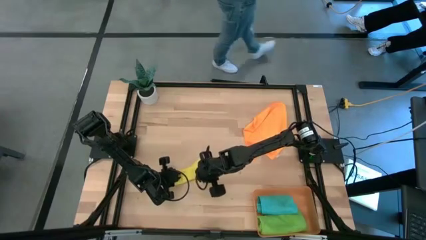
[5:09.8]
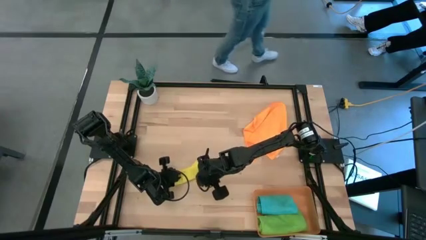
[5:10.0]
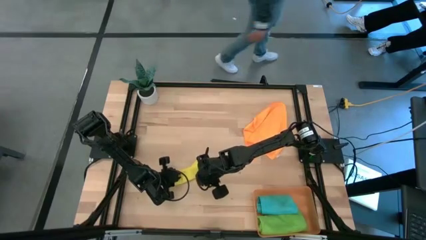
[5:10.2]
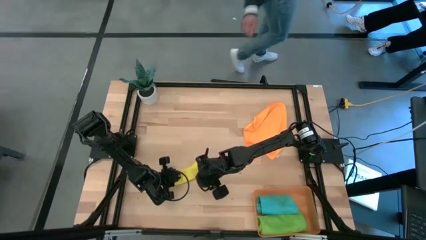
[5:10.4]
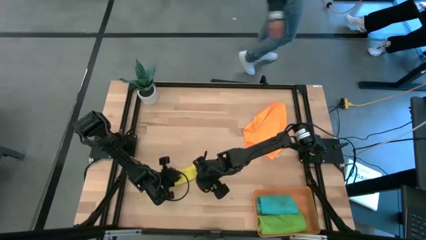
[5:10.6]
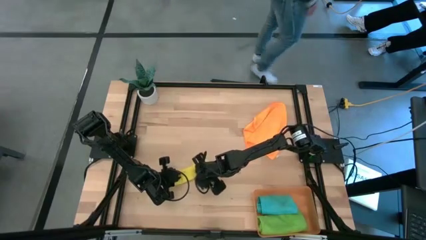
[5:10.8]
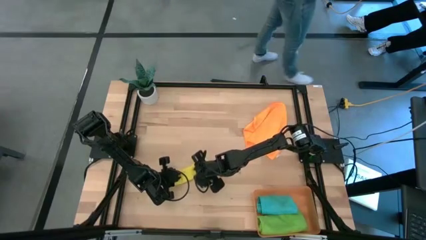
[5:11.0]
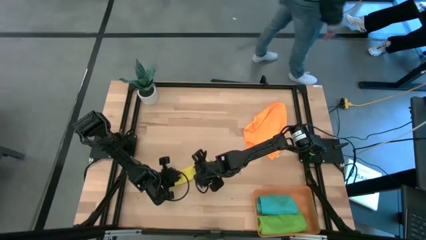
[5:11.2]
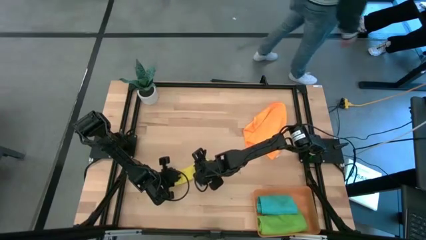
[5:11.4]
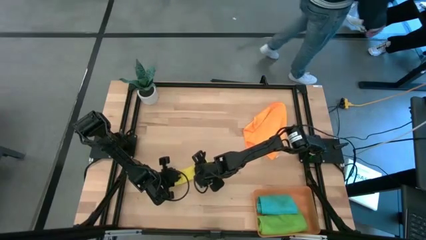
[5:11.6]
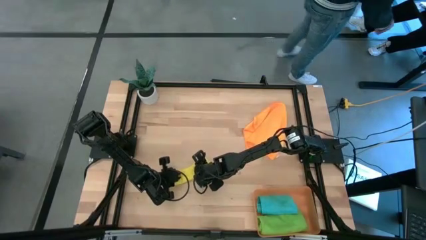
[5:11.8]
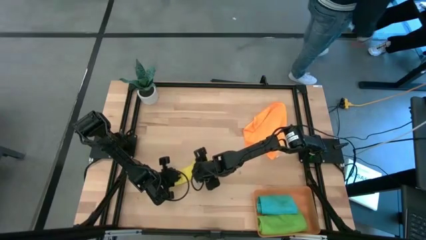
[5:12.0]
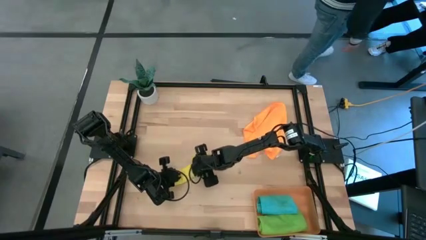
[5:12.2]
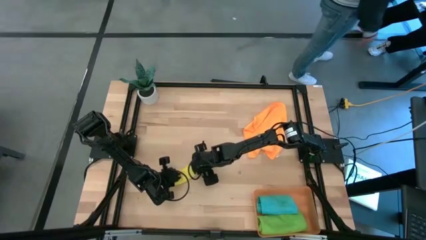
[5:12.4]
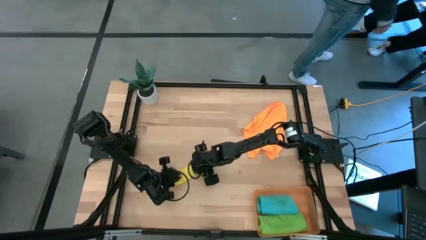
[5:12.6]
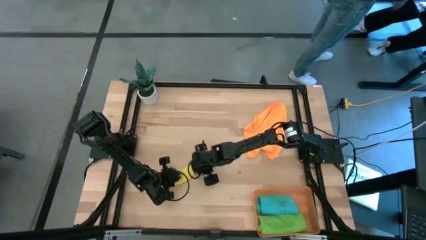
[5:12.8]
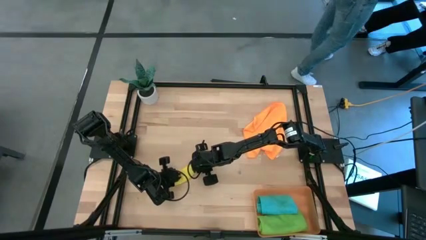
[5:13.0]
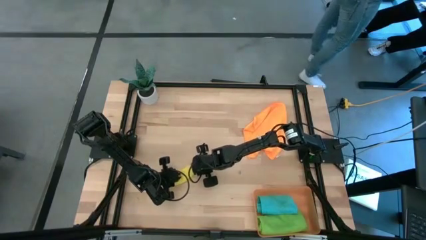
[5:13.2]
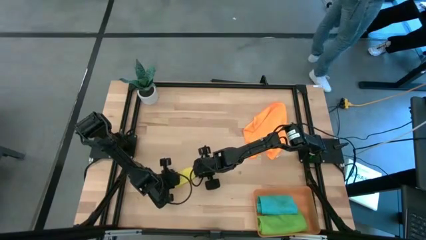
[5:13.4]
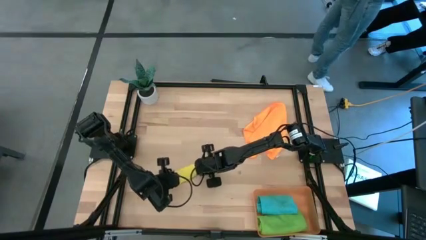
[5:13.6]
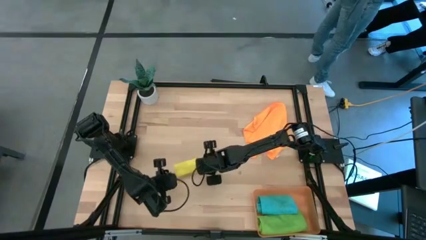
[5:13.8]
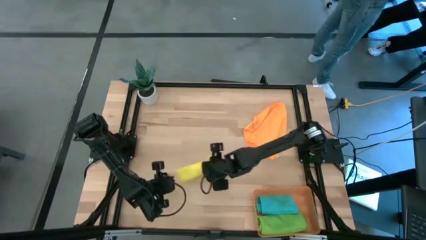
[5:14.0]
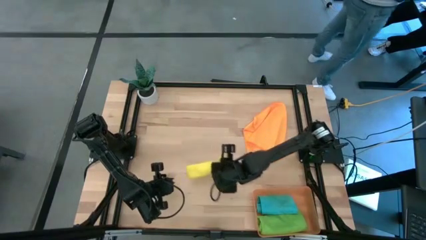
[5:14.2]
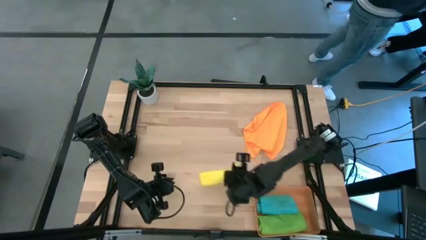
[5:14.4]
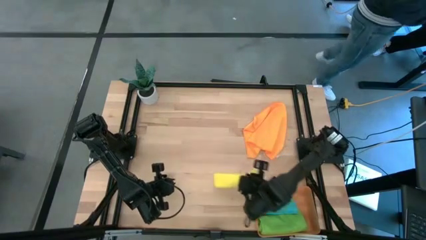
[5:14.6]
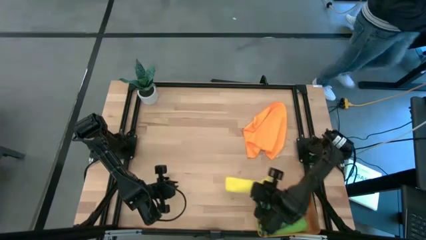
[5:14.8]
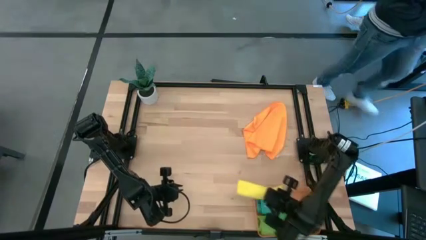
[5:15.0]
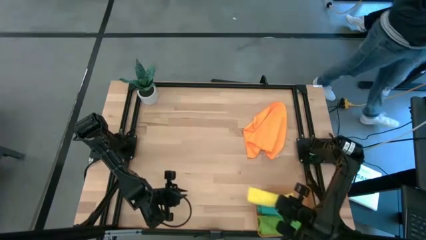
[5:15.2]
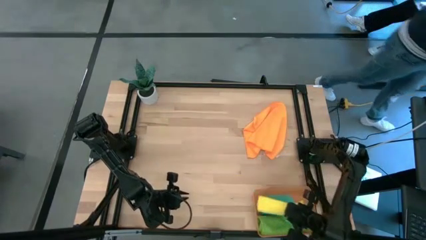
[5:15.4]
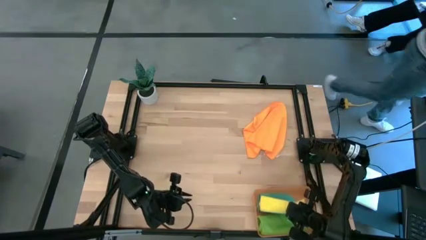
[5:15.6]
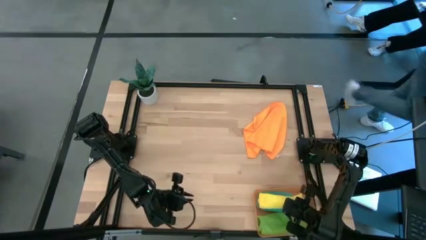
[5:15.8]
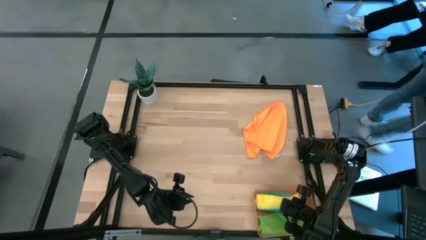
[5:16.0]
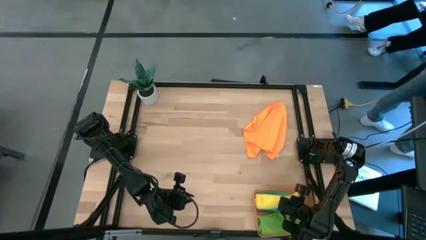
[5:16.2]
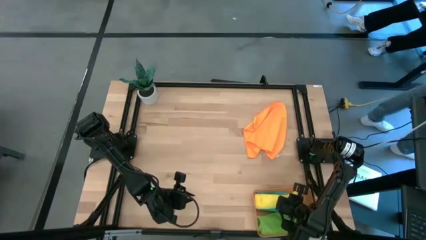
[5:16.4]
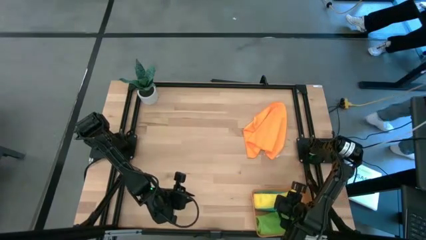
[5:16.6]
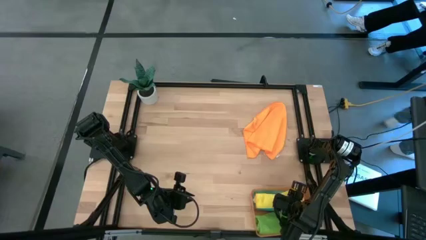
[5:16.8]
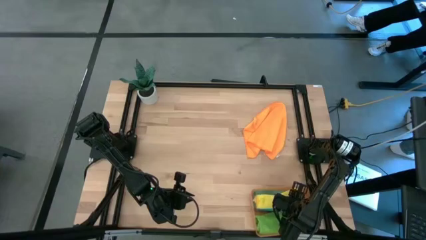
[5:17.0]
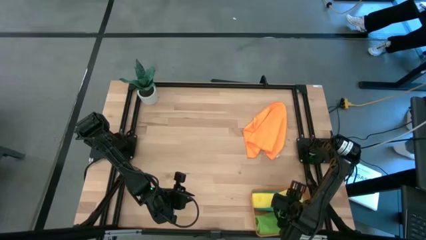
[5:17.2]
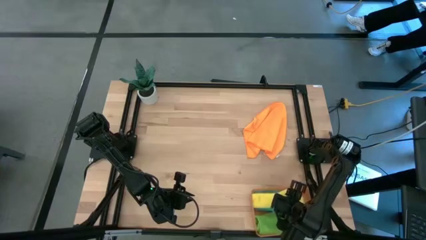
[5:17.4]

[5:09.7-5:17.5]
Task: Roll microfiber towels into tight, uniform cylinder then place into a basket
Stack the yellow microfiber towel on top of the blue microfiber towel in the orange bin

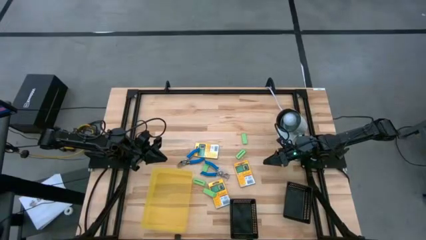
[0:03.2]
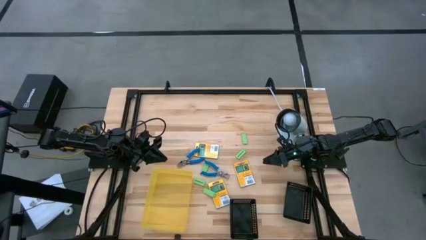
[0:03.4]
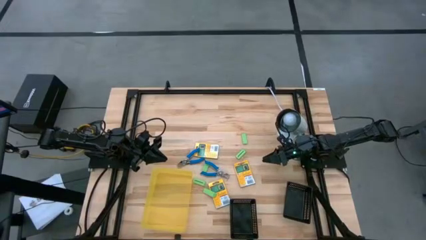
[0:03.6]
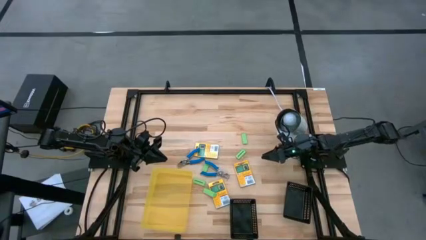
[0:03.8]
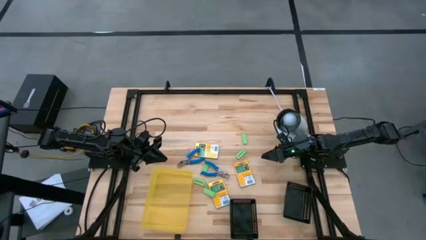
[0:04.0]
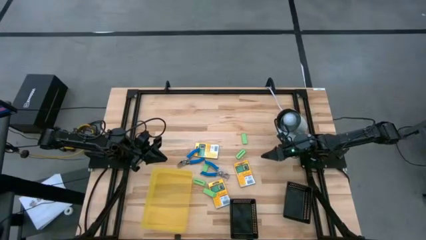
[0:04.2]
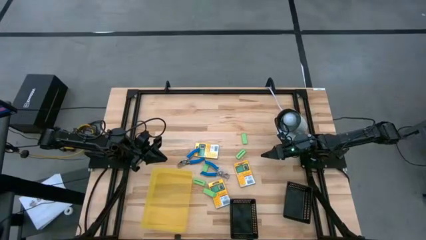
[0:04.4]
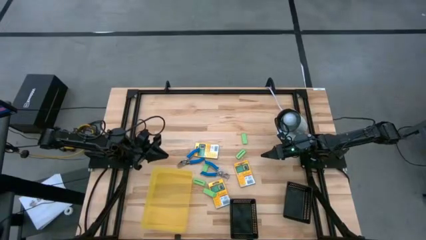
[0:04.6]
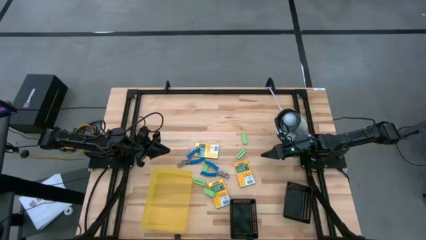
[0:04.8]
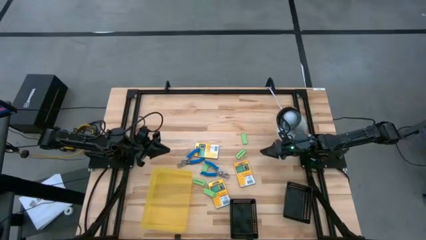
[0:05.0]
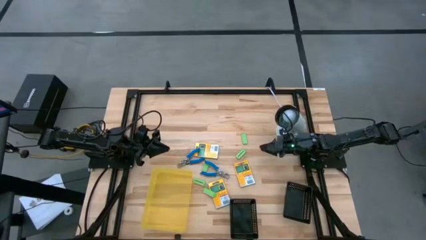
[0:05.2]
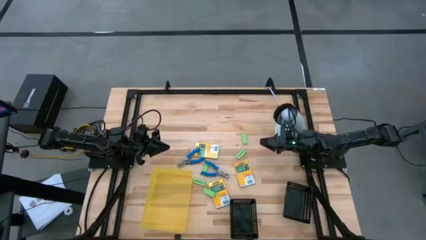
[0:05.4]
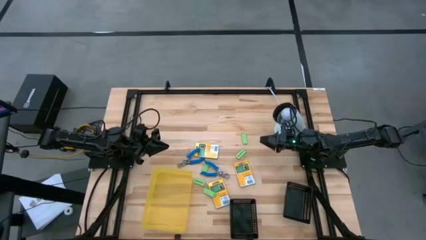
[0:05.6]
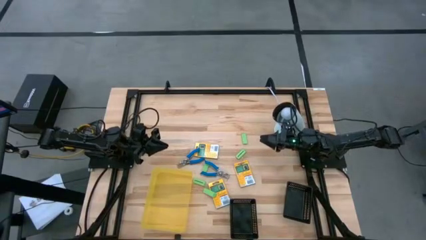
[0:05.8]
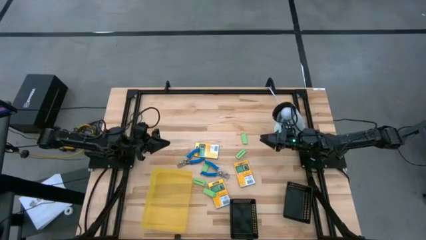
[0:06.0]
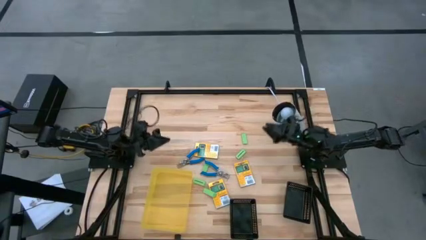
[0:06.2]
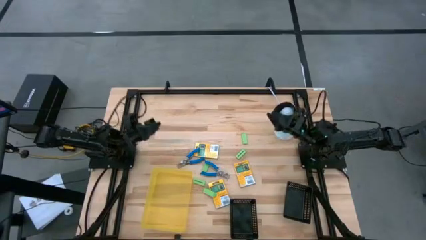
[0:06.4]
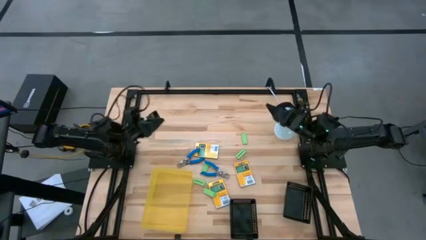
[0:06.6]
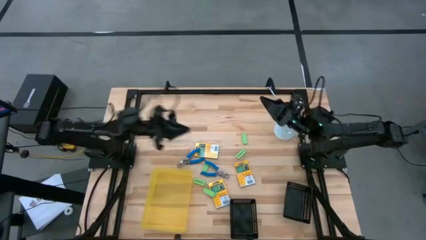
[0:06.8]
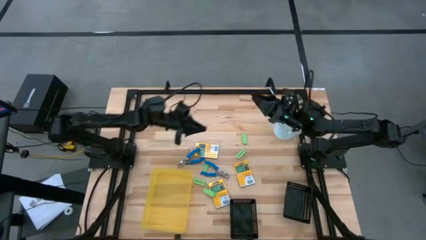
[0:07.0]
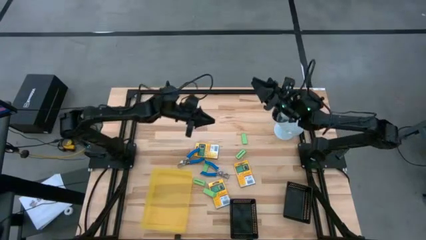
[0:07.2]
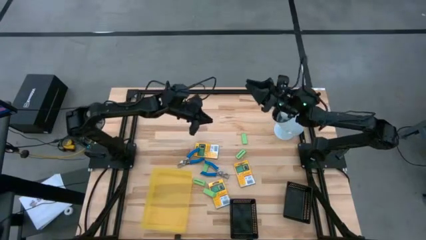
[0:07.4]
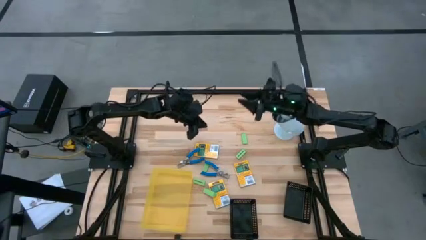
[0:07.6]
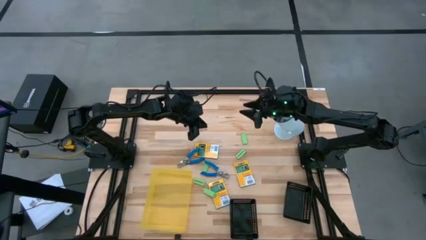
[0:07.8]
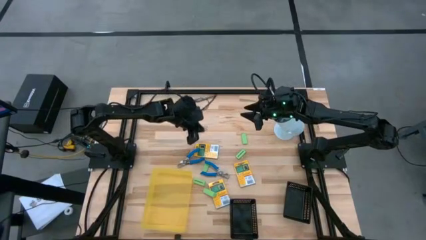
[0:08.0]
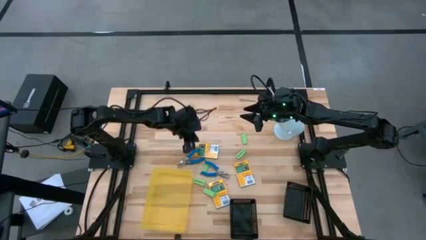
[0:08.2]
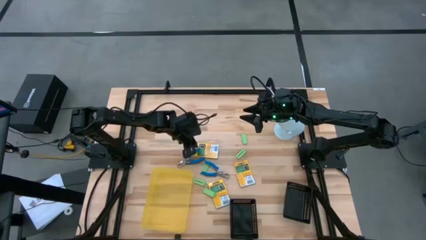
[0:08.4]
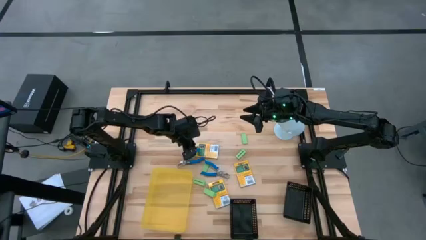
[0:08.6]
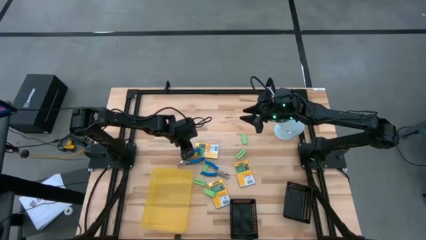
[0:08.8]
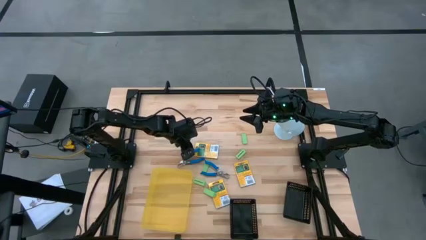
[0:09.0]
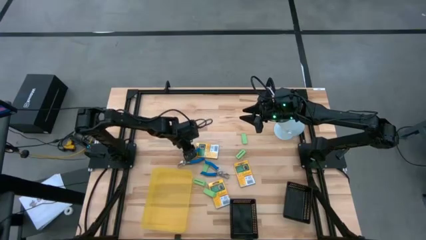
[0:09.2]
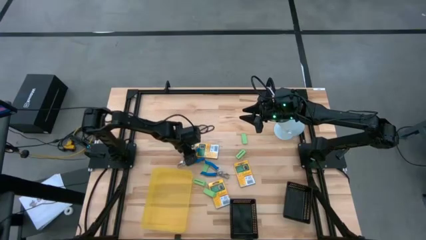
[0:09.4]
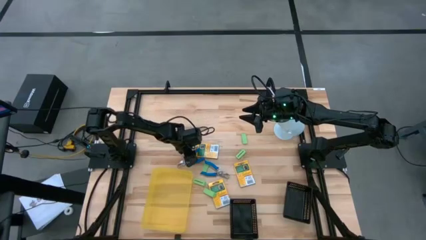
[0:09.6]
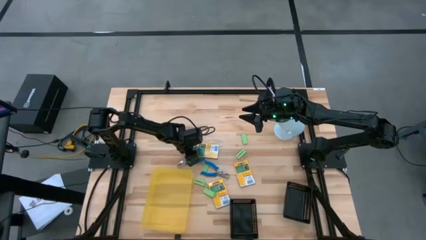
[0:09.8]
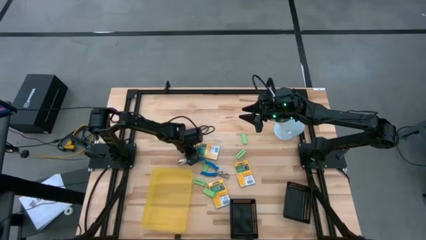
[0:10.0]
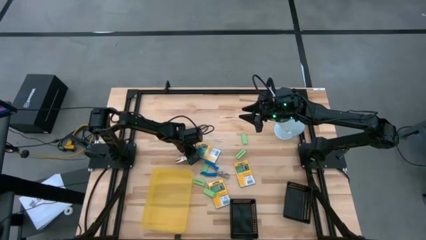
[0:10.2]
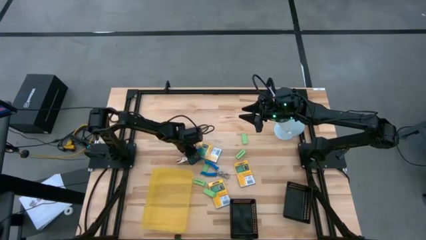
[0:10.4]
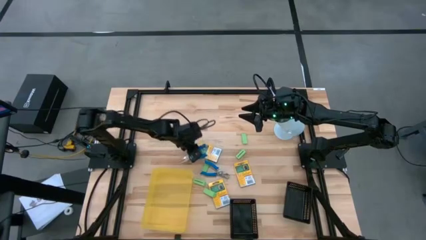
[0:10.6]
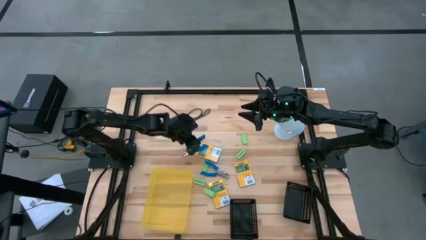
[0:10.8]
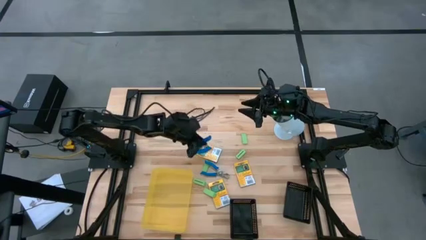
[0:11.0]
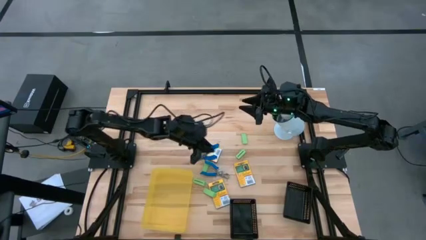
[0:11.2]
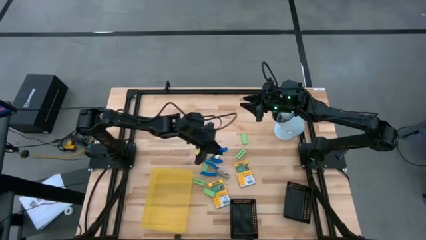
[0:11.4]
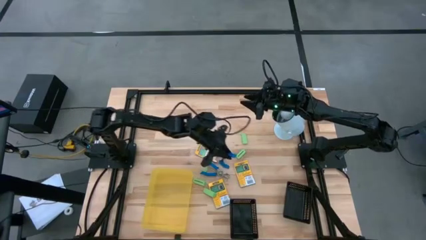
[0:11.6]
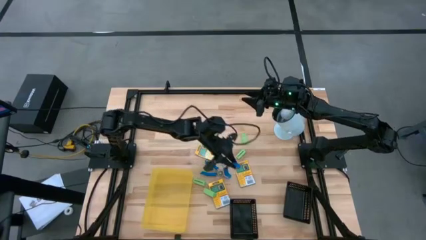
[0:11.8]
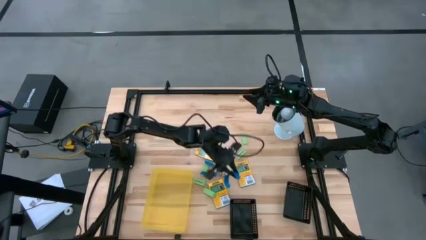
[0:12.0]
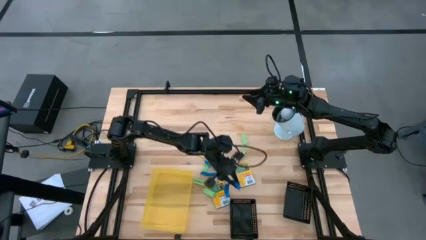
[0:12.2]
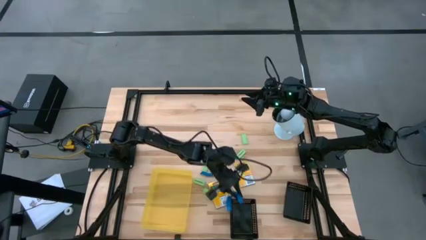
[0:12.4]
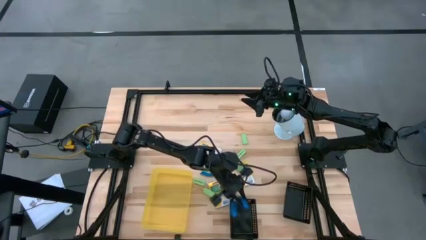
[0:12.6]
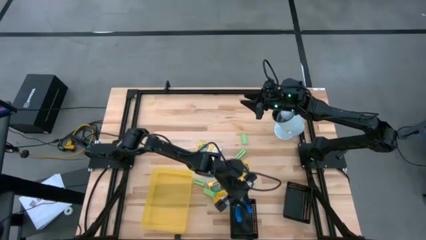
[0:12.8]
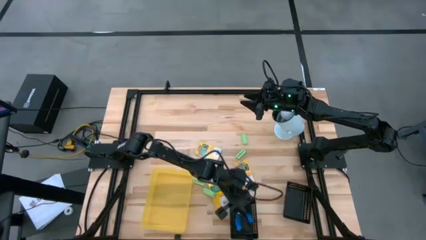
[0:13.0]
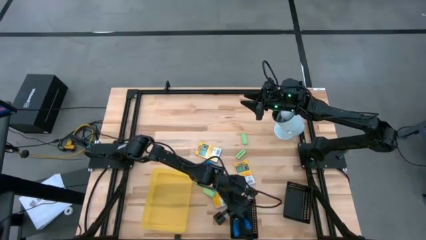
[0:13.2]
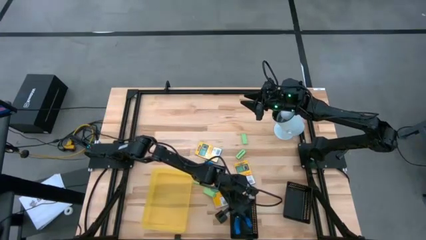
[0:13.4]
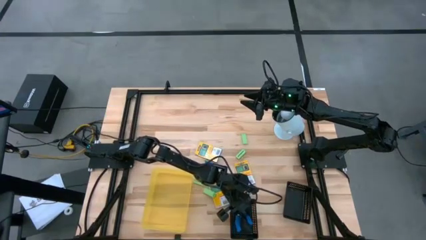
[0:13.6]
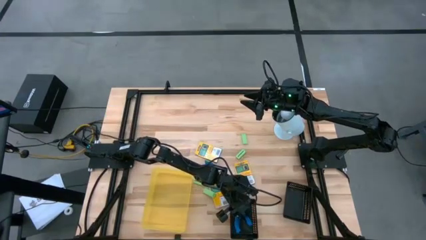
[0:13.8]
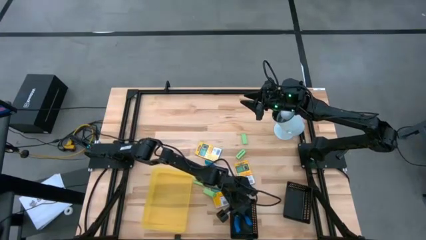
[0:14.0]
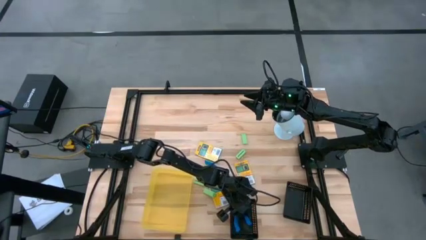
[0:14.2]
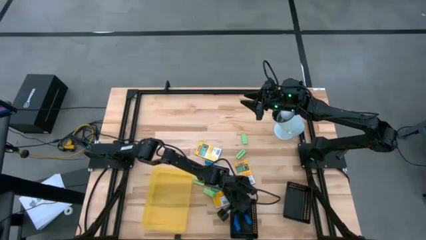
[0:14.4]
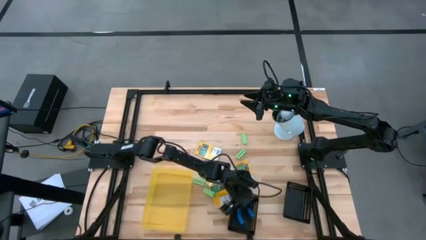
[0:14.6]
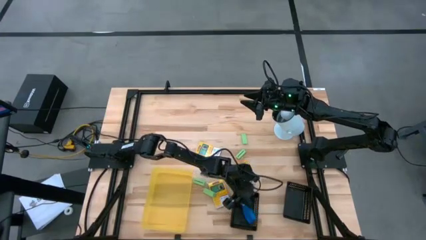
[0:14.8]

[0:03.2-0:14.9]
Task: Pick & Place School Supplies
Put the blue hole puncher into the left black bin
